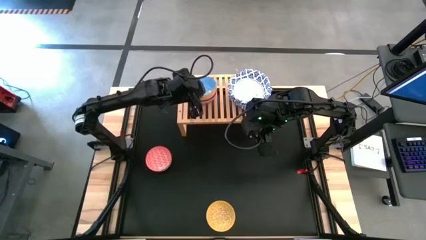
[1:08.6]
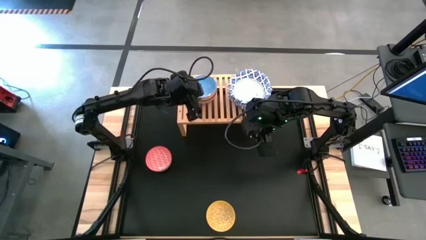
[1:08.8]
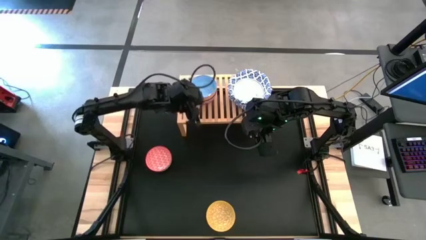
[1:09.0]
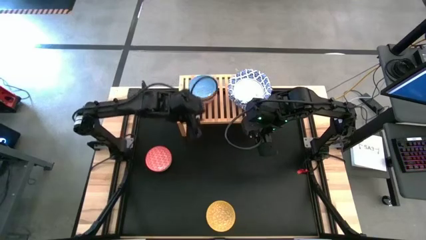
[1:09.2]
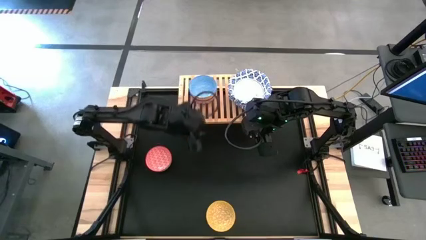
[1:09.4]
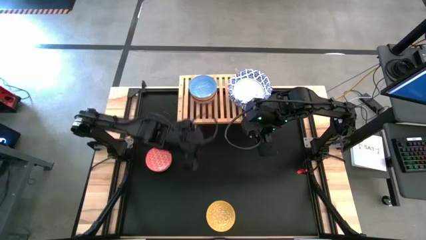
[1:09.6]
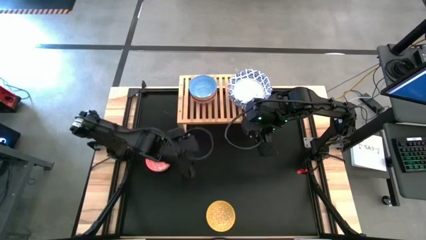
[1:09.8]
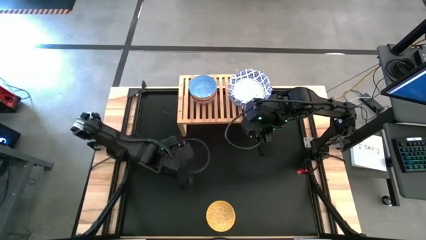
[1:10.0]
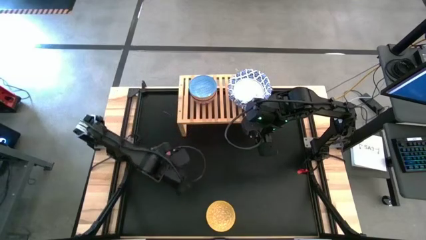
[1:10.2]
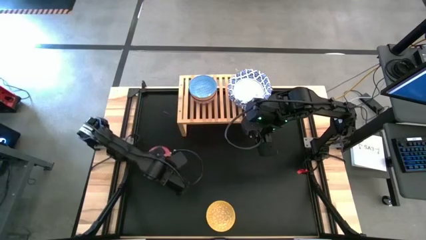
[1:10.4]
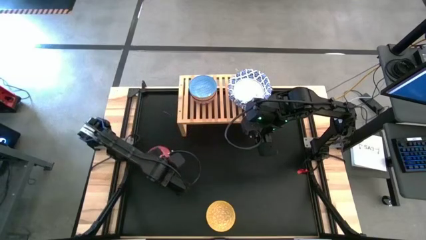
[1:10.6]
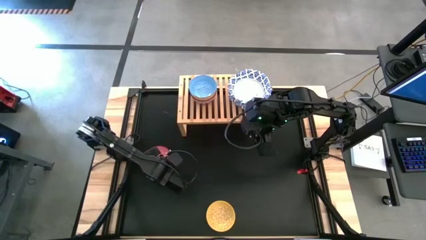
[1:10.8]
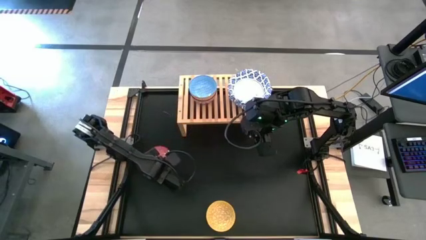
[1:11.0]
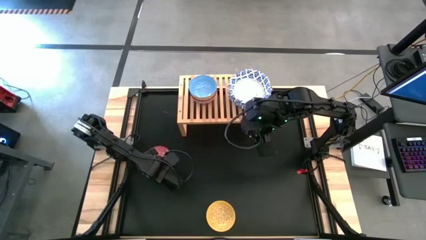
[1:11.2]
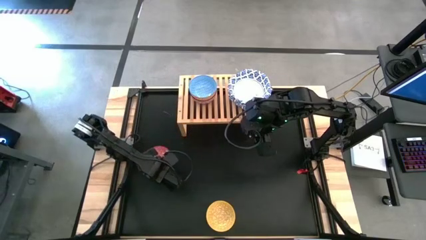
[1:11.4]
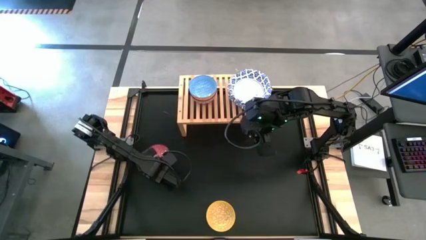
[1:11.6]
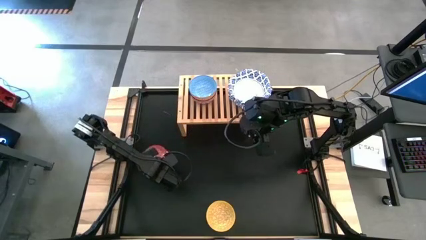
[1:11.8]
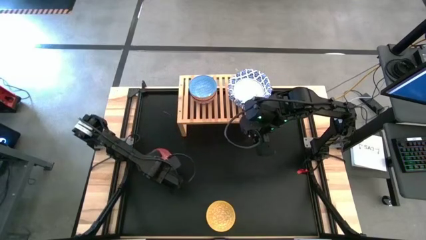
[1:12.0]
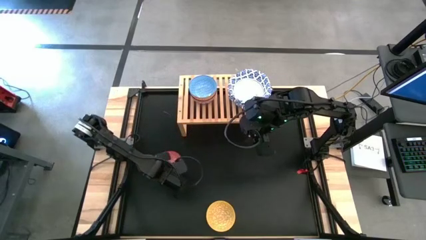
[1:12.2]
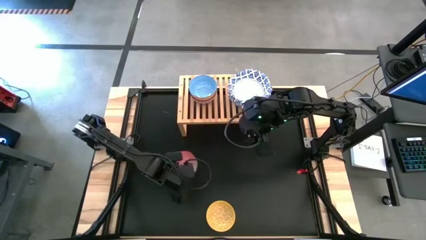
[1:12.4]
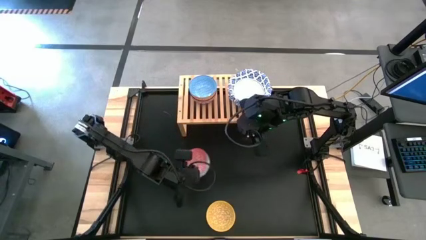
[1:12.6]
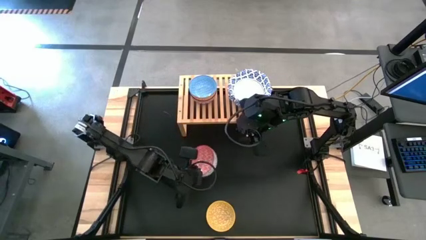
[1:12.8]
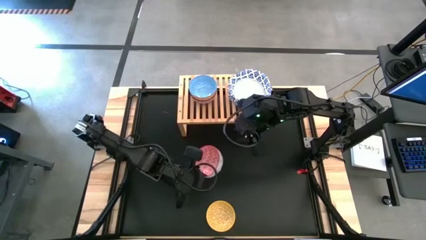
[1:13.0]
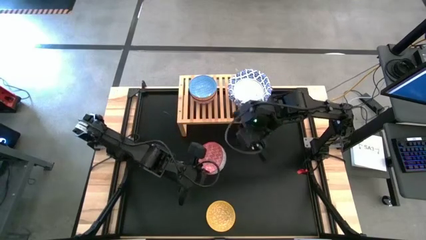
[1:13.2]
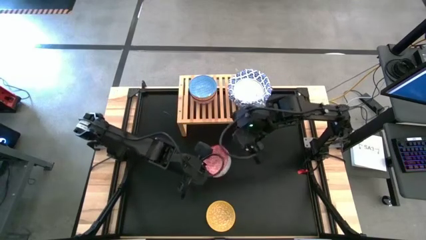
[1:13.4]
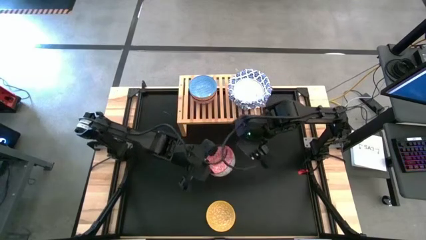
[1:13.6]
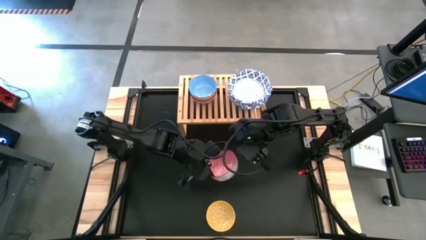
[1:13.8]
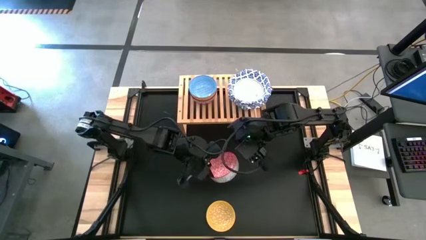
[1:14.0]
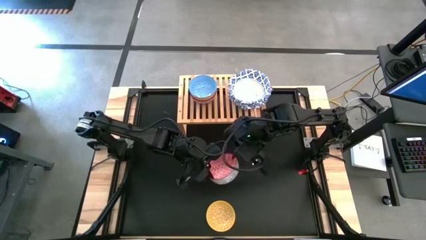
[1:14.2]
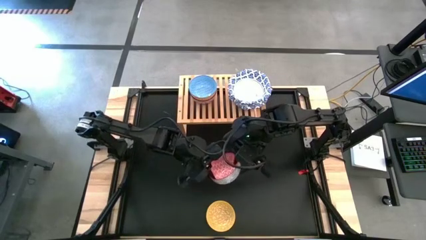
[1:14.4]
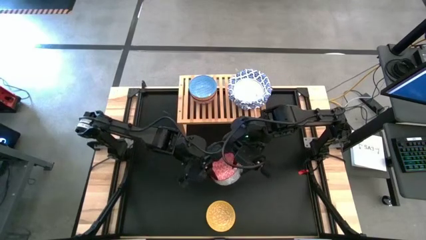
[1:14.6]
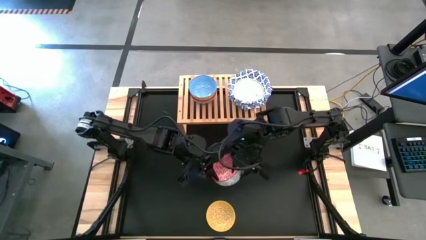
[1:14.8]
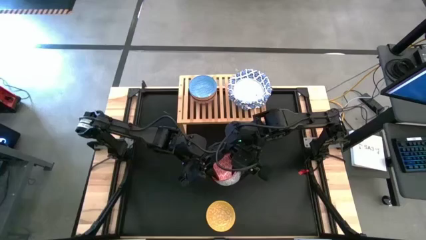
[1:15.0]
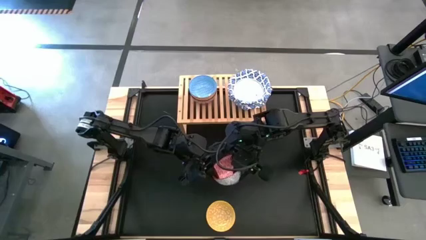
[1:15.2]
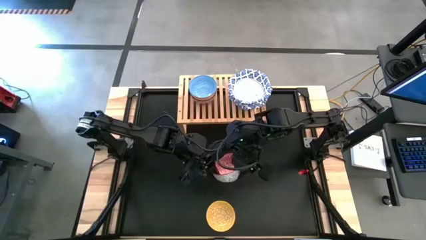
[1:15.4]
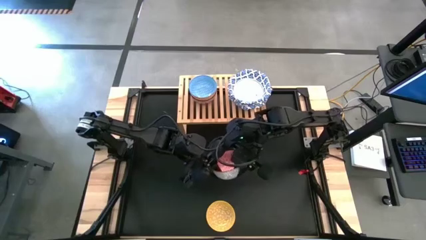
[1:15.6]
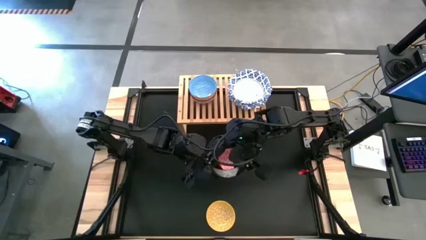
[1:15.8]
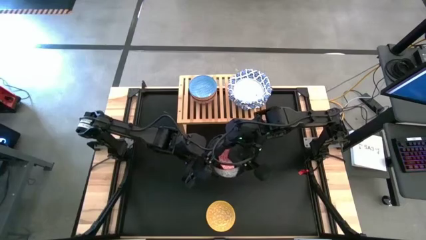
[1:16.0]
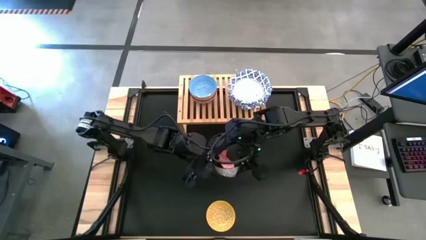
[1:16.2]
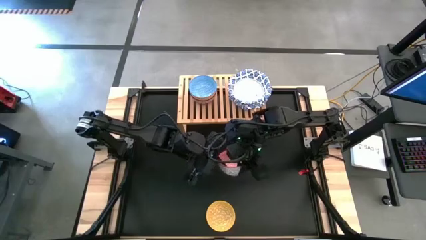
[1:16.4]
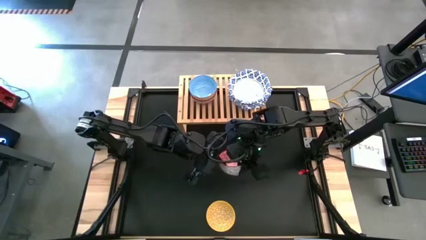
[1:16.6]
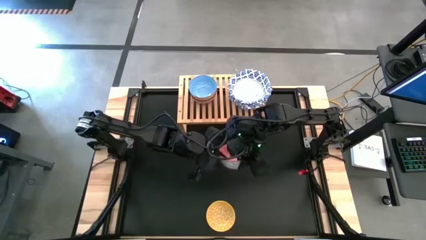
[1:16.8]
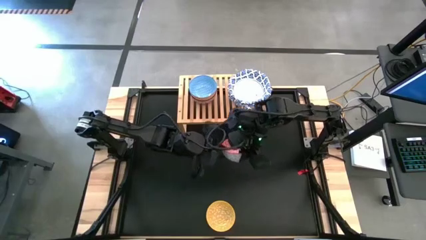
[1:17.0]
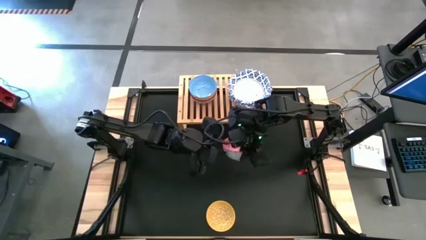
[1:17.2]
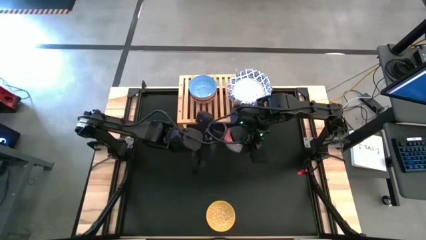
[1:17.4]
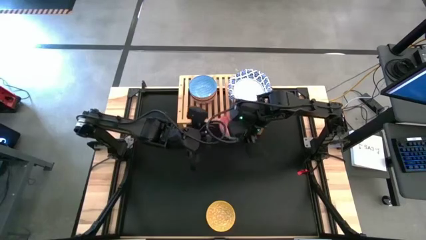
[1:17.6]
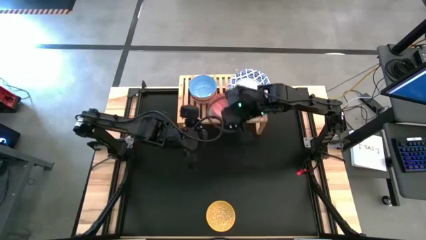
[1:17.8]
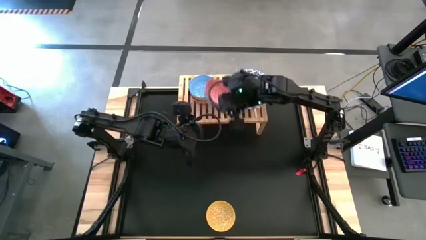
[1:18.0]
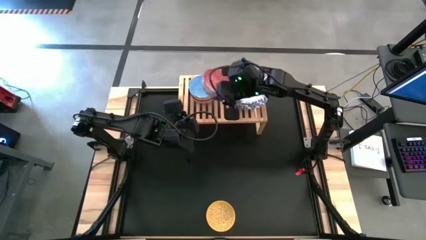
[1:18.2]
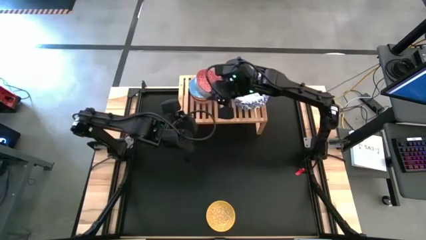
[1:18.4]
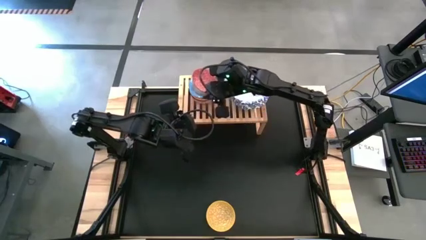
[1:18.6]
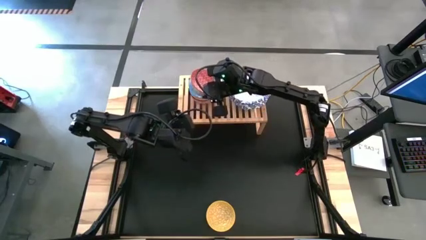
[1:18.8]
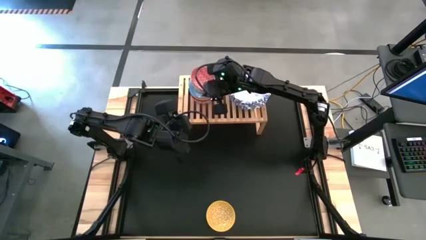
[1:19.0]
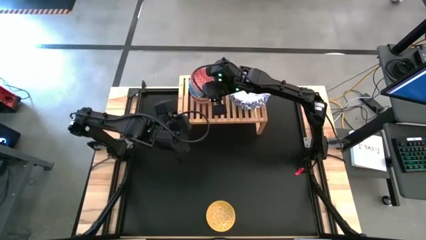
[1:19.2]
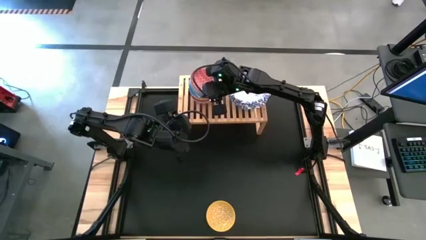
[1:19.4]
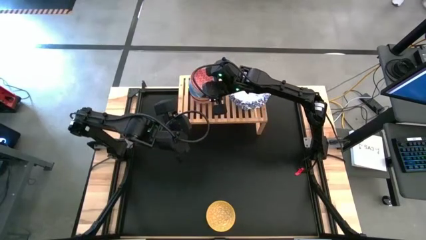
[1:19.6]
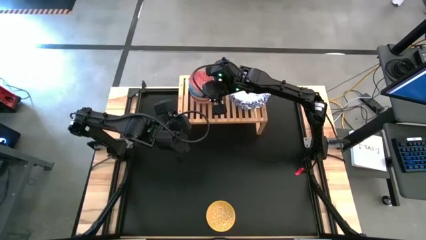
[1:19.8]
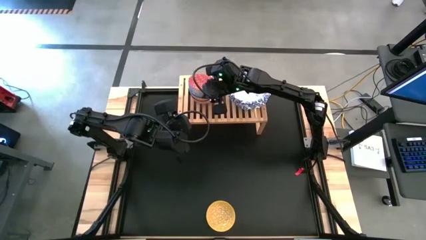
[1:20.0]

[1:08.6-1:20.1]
Task: Place and stack bowls onto a shelf
Stack the gray patterned bowl on the orange patterned bowl on the shelf

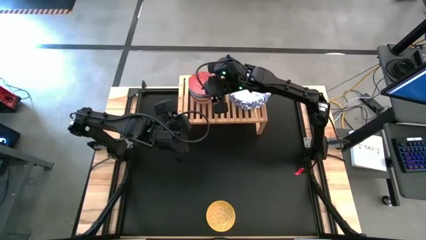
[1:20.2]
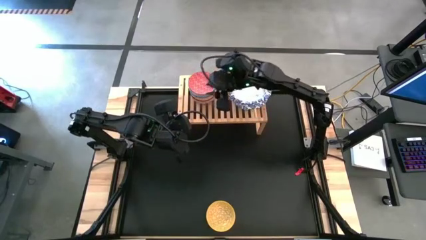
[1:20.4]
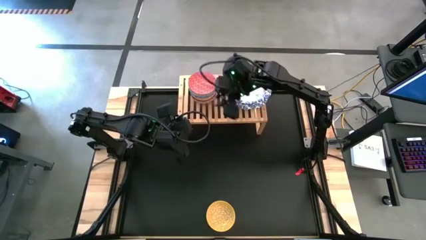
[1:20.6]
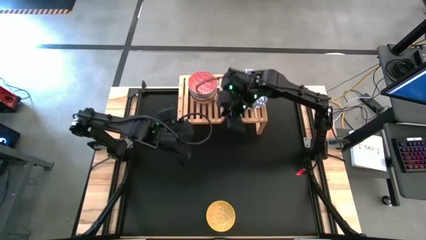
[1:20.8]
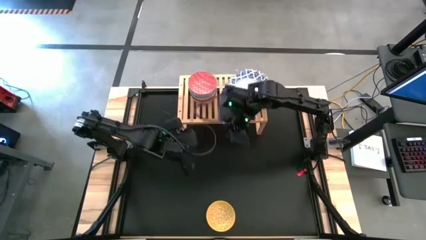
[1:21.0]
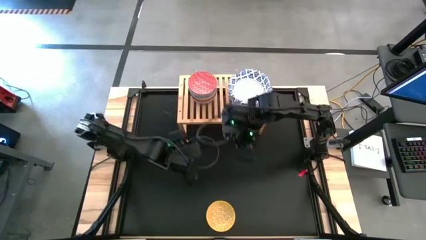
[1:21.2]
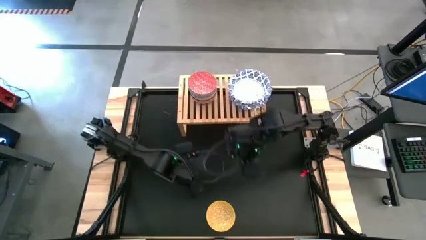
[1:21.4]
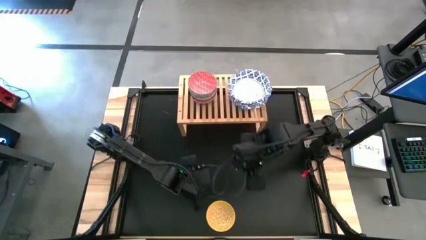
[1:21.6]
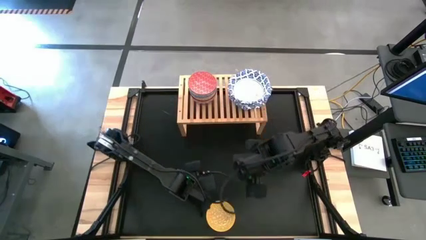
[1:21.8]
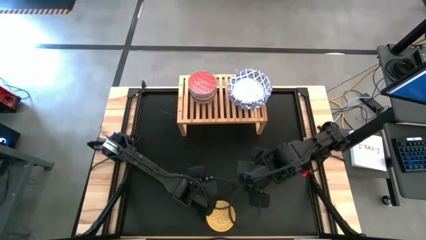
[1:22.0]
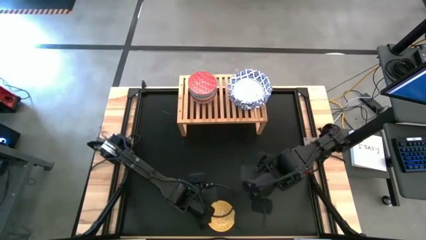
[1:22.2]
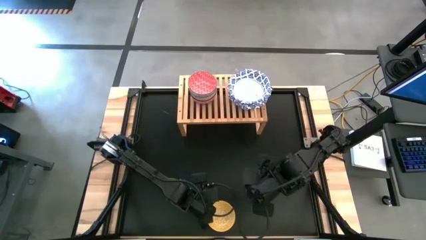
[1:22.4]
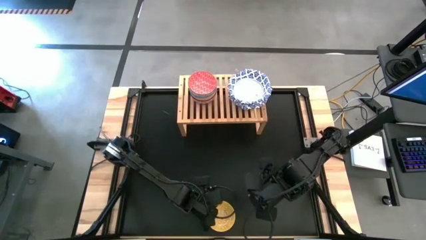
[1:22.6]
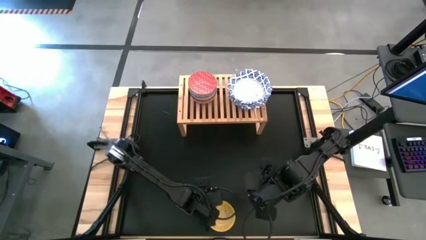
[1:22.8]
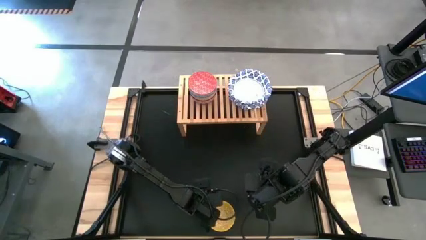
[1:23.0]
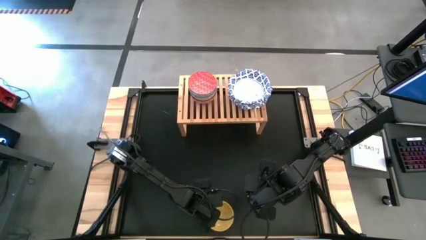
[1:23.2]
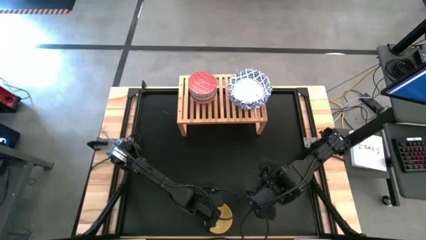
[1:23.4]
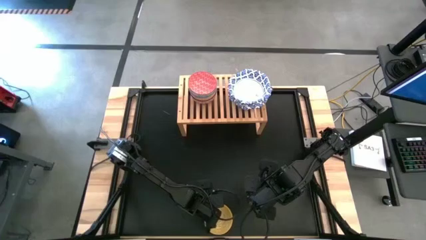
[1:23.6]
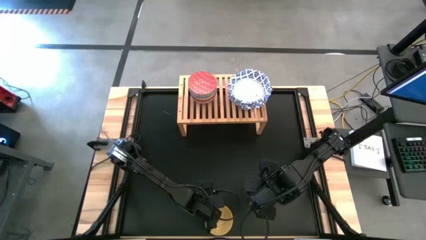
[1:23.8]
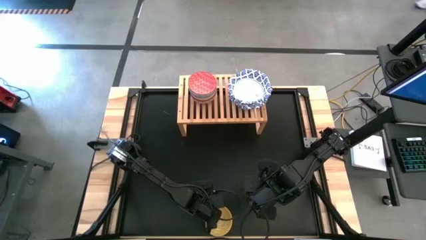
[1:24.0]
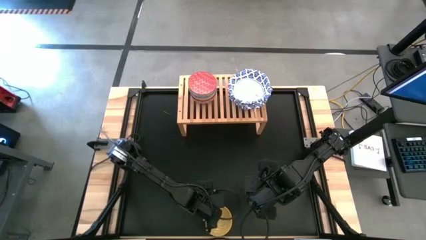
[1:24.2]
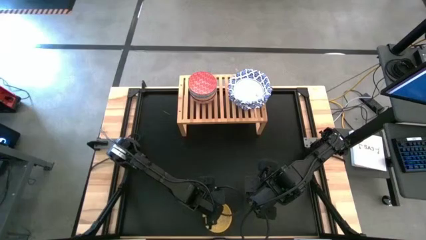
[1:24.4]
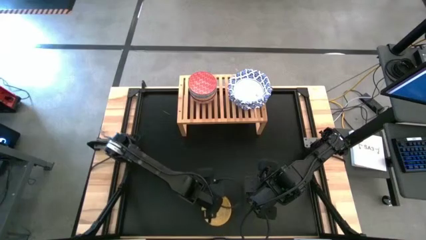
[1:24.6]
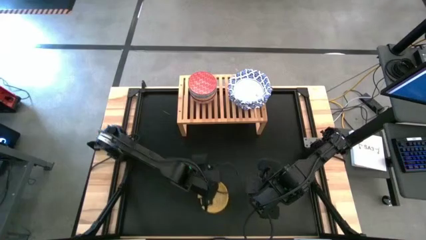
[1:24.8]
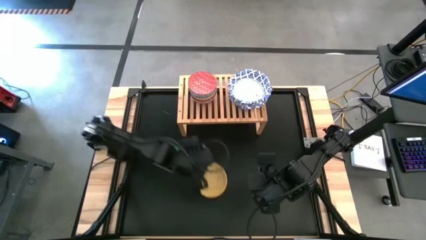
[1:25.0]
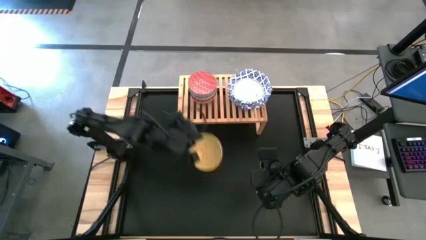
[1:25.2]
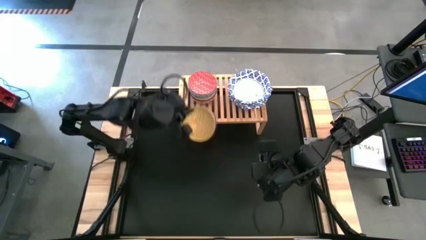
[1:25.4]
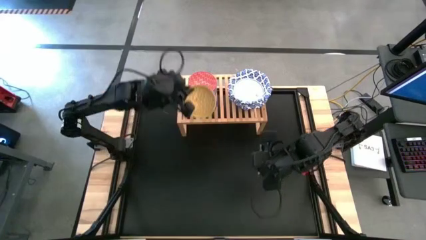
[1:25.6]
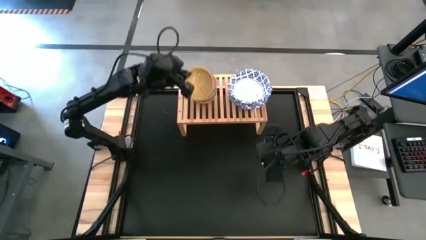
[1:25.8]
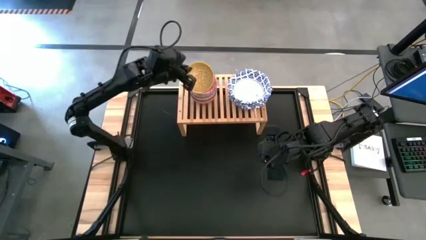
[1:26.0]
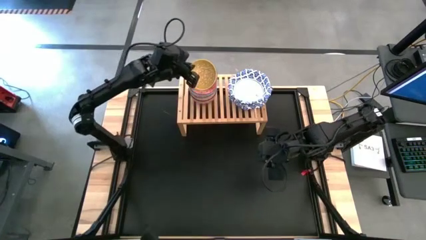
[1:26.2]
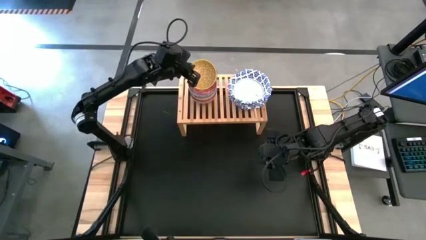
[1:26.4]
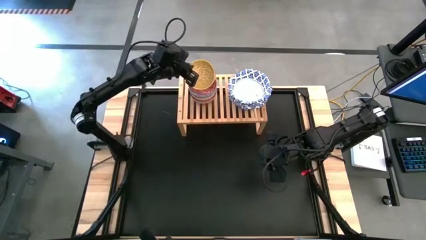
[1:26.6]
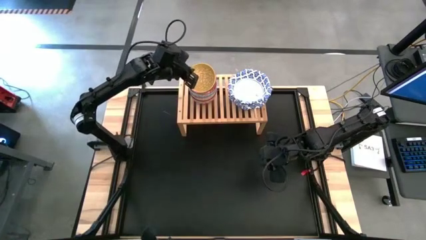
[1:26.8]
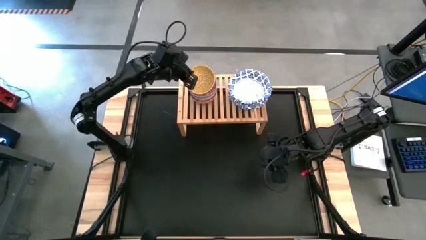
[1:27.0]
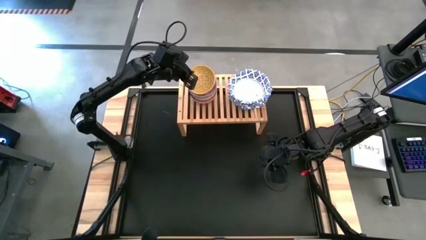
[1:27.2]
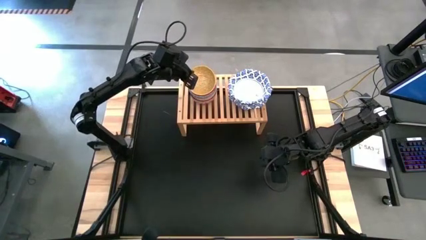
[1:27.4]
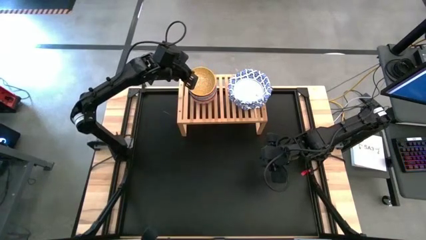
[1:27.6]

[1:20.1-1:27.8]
Stack the blue patterned bowl on top of the gray patterned bowl on the shelf
